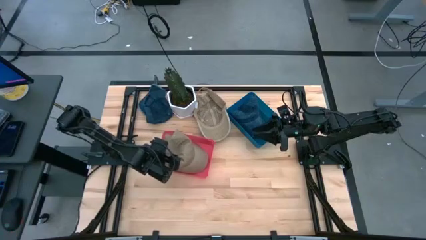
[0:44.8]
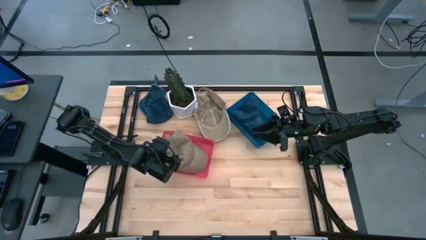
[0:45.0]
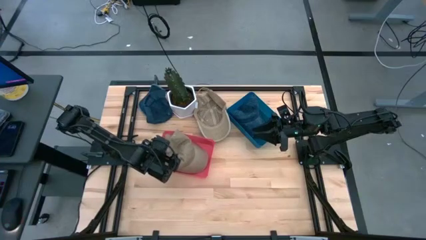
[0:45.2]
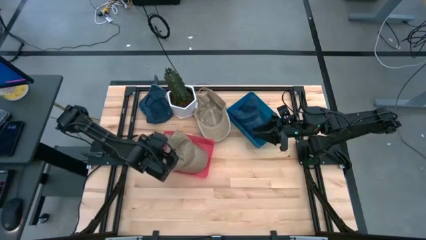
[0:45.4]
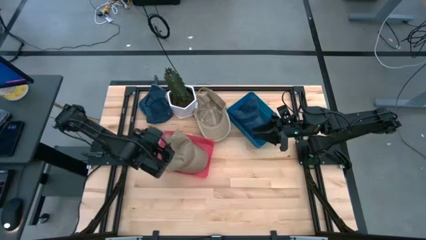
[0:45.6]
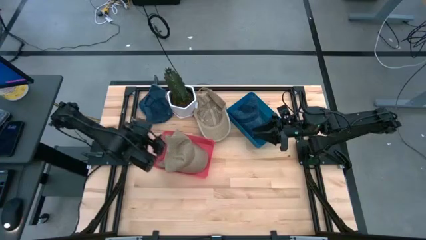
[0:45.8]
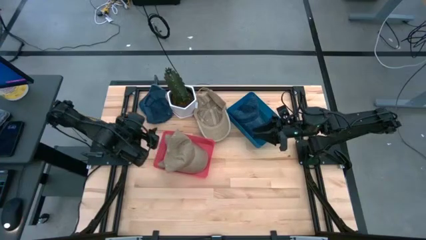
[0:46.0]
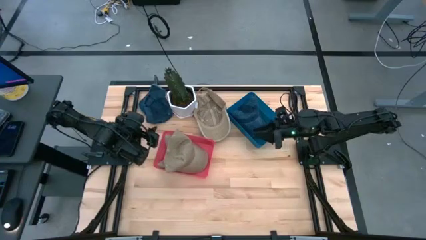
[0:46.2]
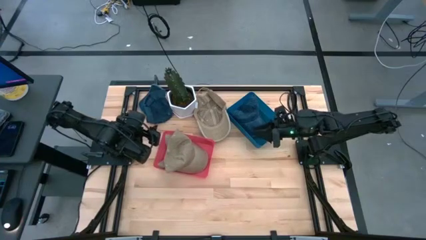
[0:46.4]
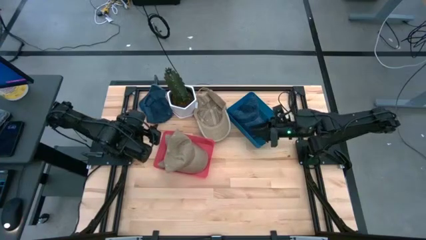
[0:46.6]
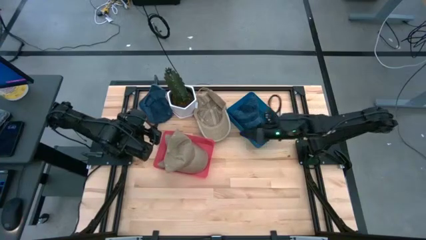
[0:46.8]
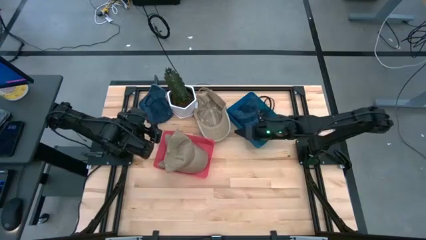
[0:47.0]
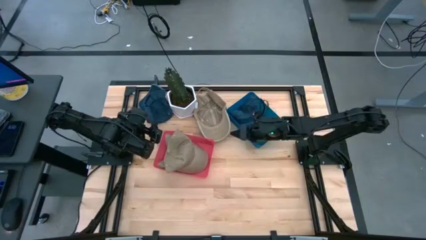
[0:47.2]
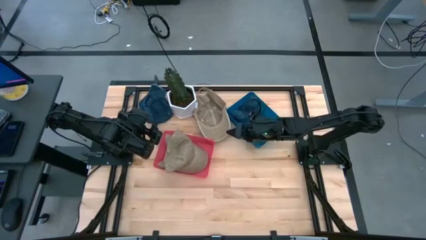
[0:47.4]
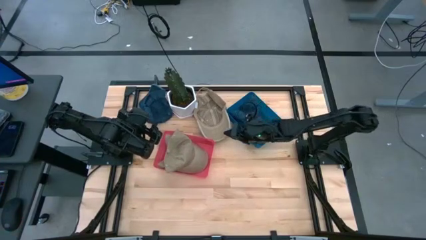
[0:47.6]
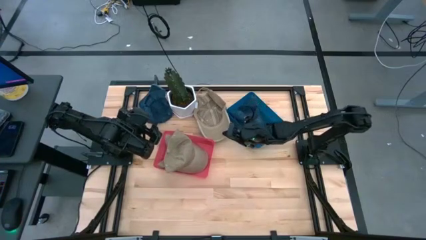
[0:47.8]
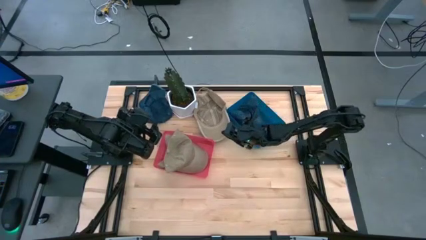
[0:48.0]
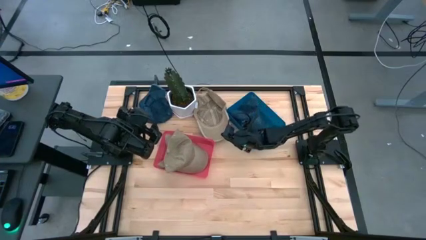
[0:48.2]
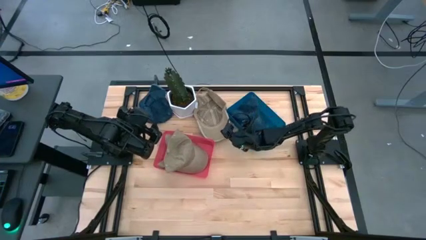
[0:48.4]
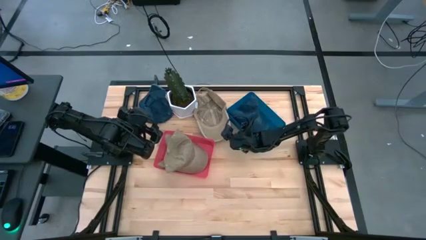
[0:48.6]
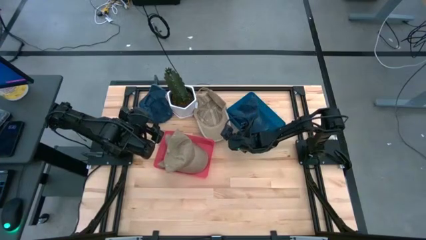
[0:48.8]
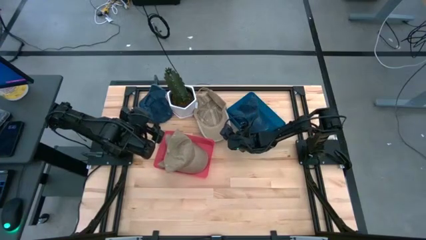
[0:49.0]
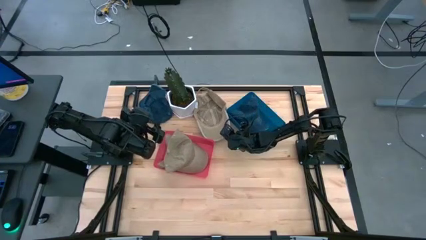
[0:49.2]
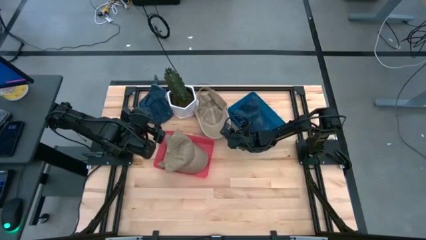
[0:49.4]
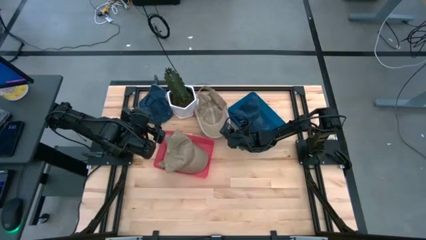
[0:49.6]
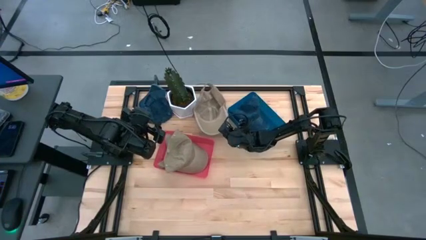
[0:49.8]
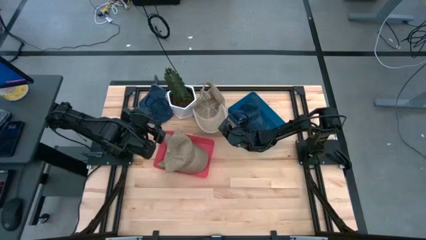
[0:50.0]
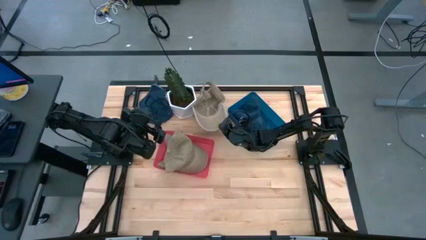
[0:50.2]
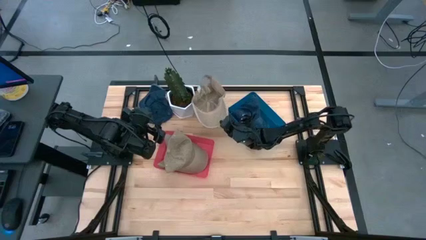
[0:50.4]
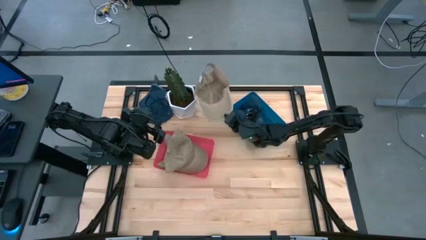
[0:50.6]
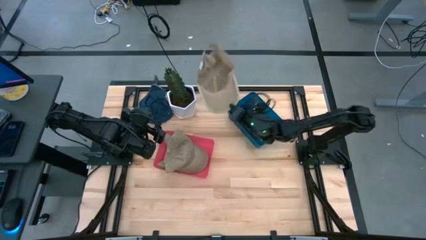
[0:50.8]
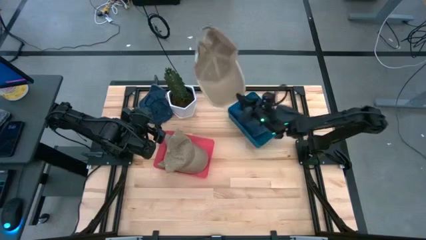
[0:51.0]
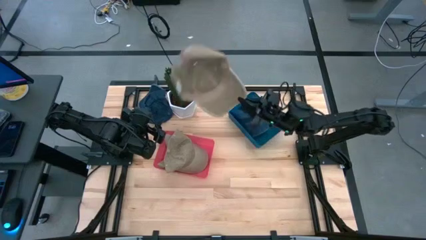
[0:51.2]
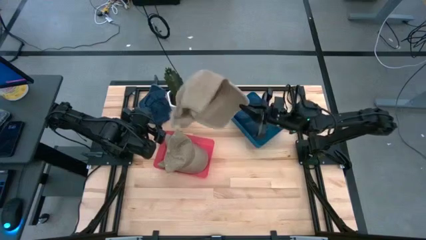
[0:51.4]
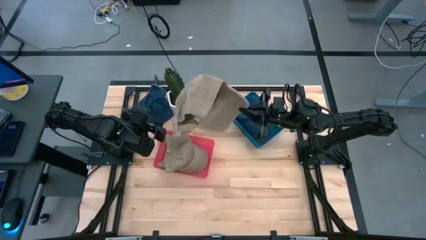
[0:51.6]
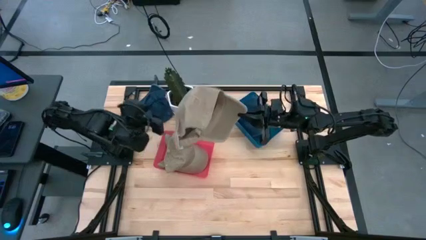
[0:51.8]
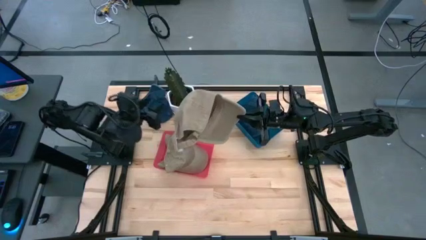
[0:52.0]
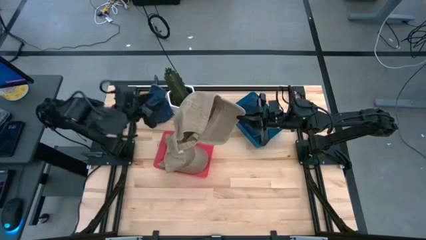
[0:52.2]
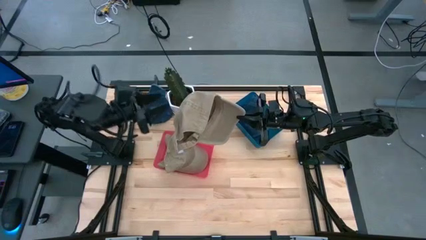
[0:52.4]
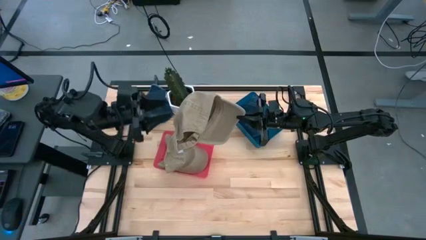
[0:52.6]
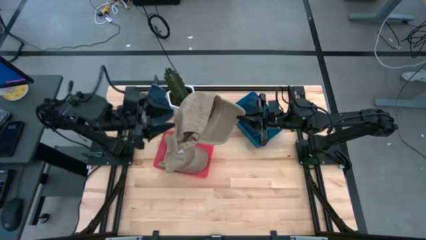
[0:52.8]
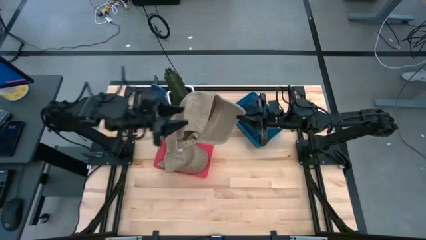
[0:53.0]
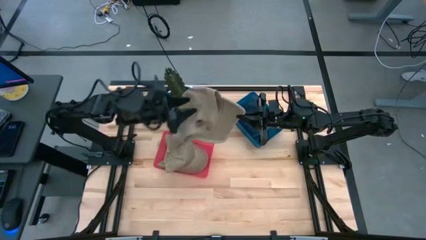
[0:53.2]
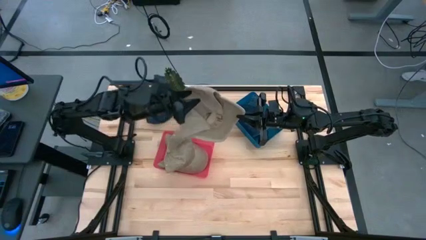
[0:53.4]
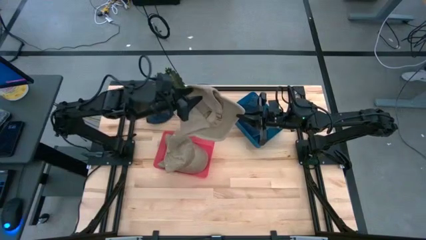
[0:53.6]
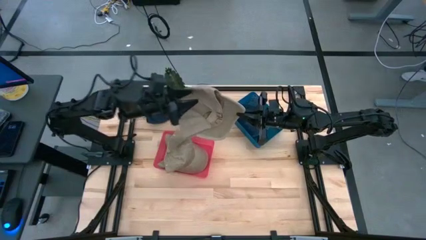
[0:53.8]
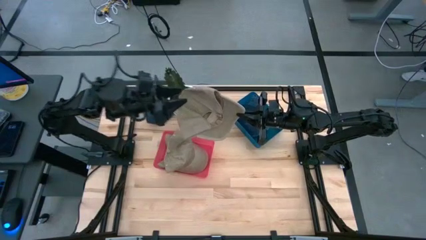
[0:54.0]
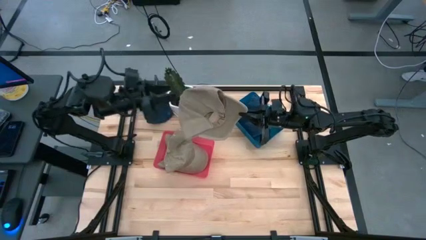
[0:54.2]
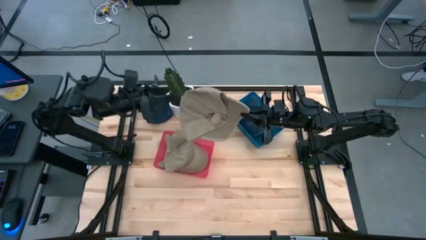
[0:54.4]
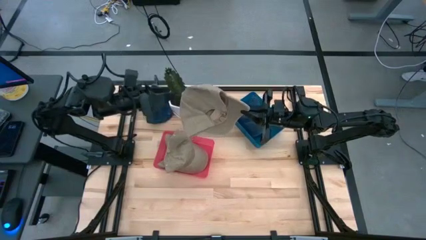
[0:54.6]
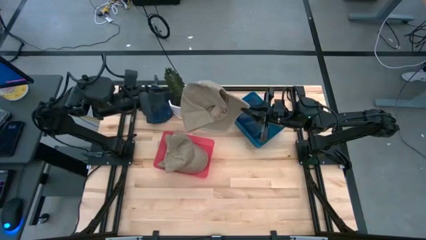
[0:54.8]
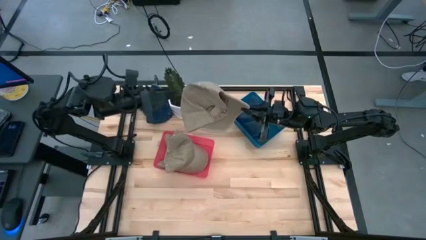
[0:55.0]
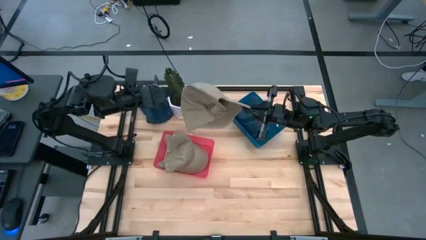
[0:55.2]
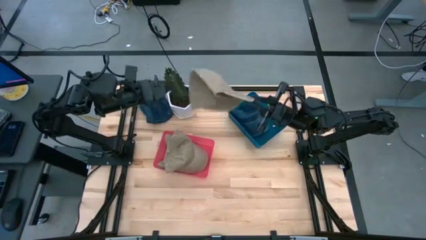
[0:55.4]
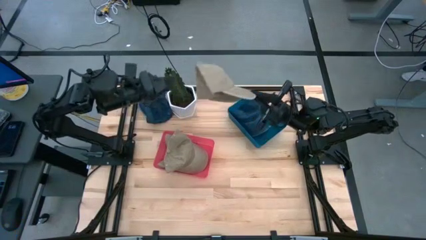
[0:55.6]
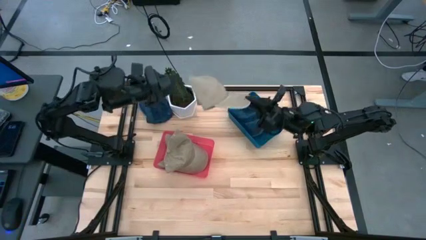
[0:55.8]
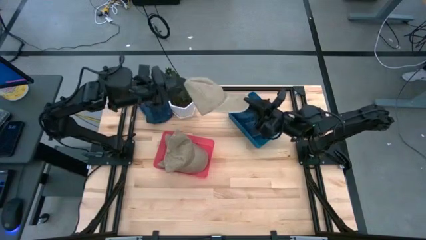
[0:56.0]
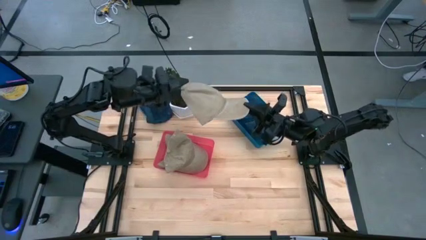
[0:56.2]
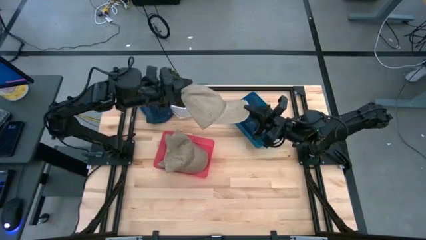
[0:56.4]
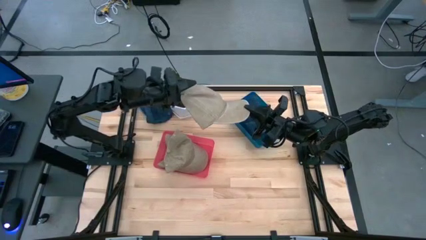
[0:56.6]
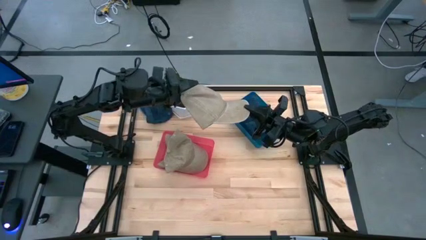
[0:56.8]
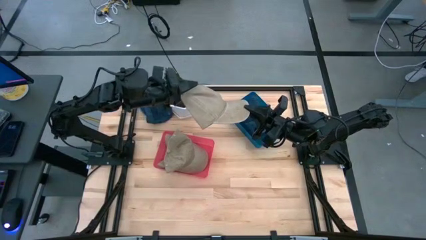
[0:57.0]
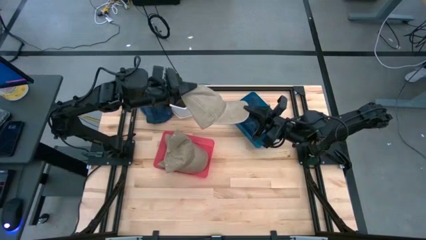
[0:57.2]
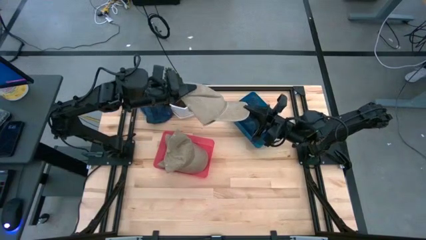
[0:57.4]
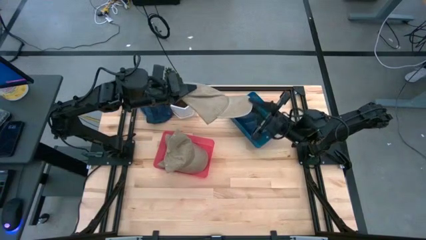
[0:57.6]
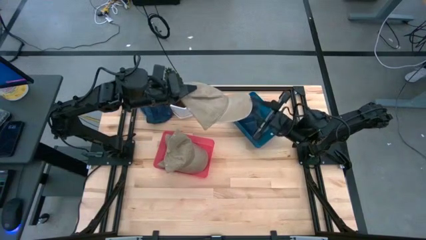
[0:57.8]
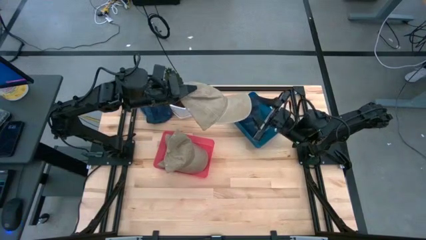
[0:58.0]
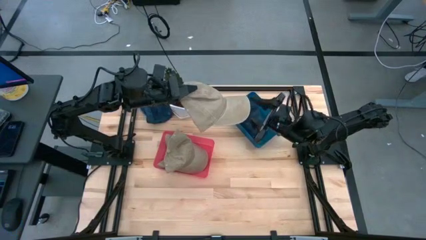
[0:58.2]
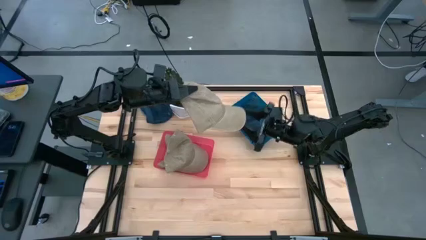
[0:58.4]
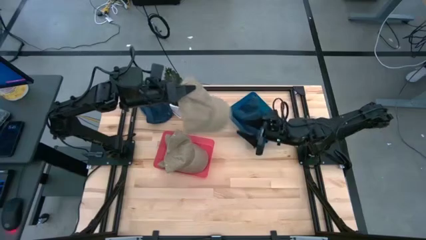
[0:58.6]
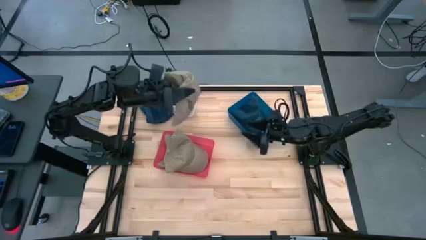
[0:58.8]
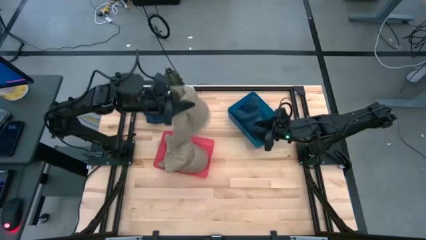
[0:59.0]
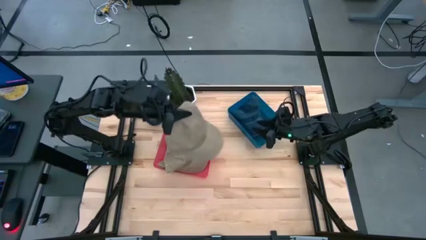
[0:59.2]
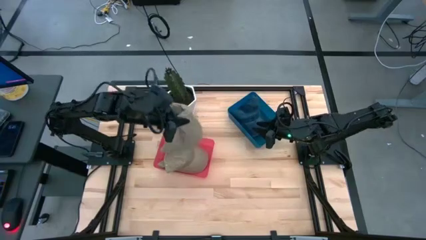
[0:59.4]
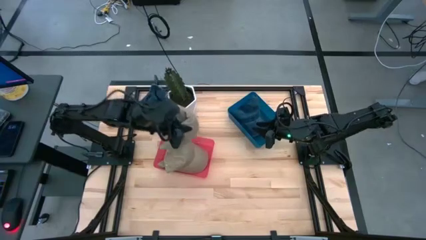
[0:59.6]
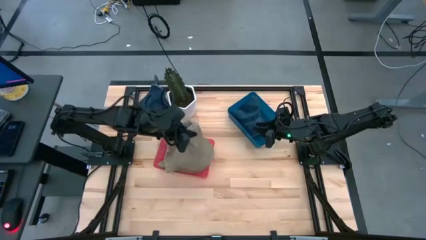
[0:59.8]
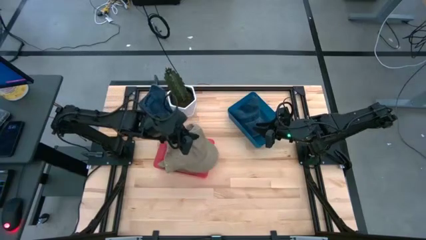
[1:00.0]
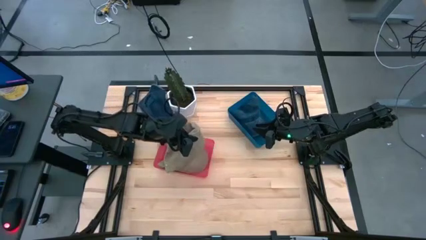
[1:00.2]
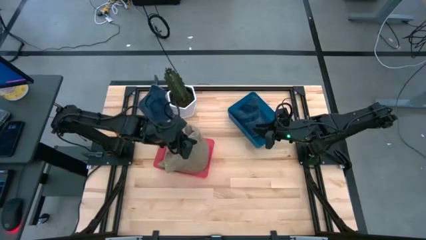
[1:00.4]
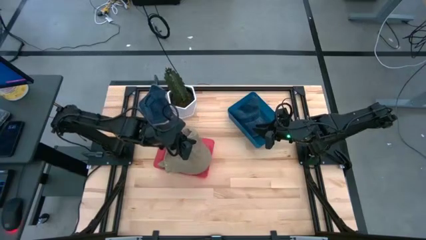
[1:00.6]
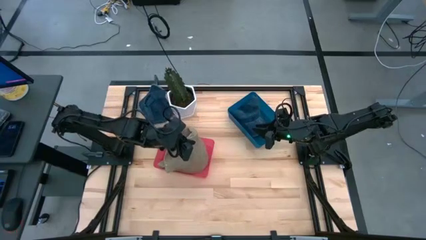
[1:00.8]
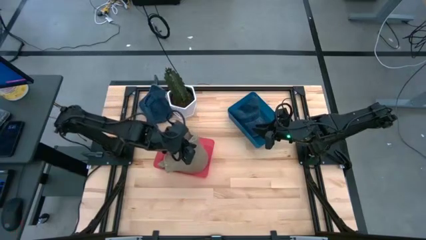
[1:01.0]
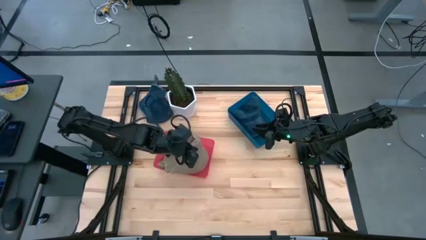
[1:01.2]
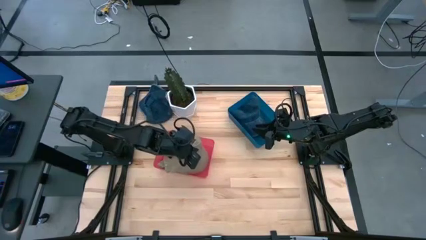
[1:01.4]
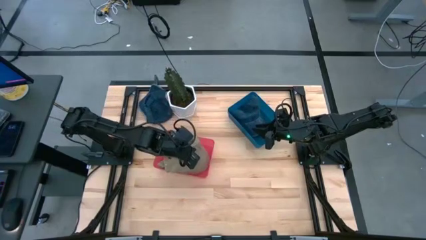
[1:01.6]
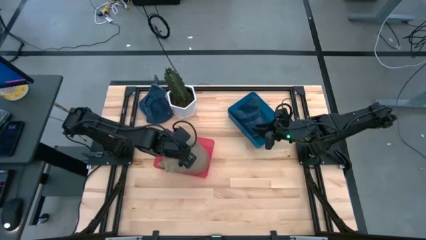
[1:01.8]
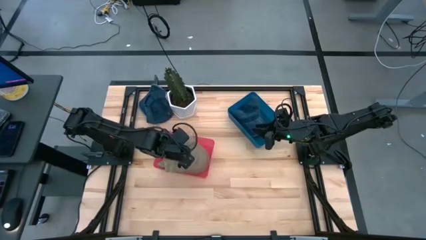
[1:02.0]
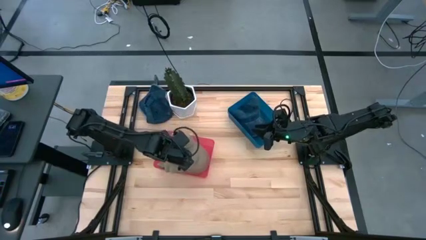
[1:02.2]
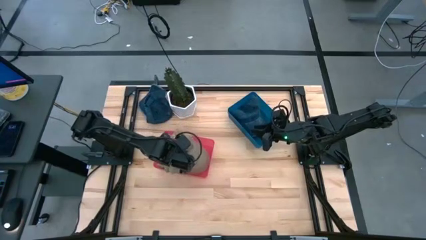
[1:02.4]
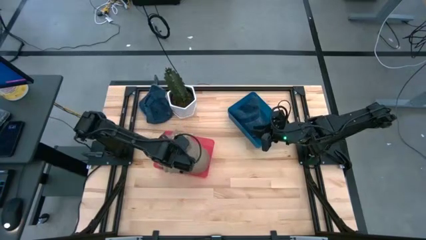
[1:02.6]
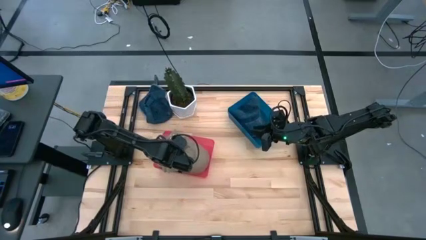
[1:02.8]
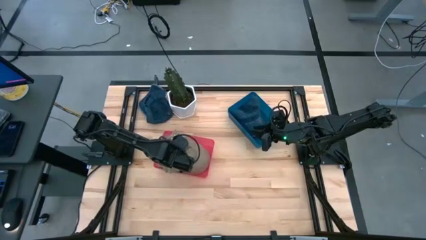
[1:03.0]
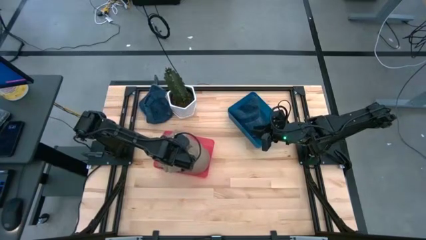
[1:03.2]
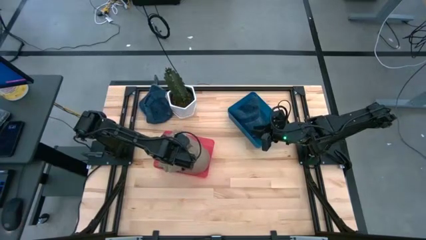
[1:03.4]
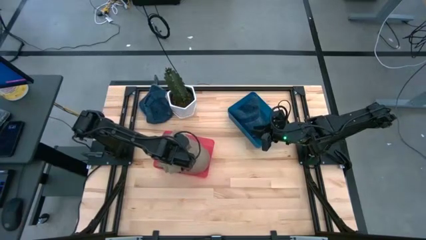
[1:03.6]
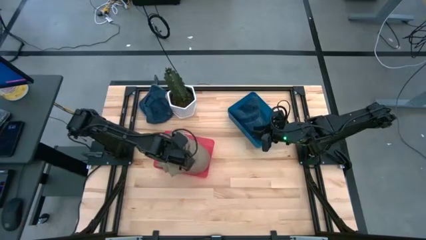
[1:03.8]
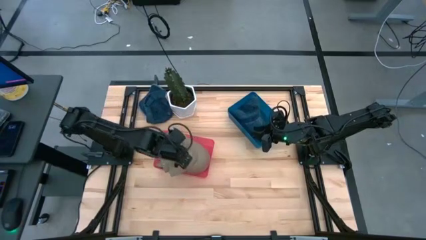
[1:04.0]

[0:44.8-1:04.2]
Task: Pick & Place hat
Put the brown cap into the red bin
